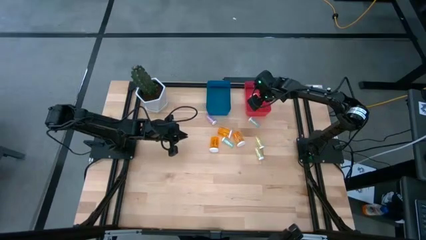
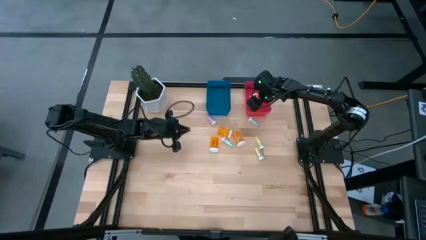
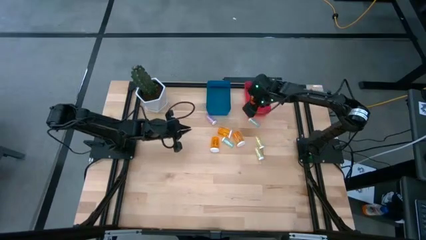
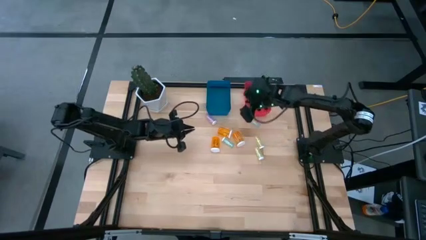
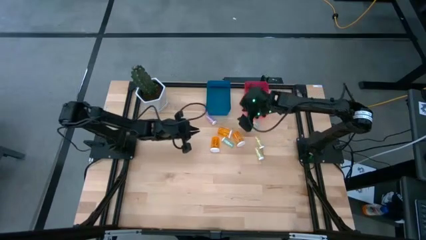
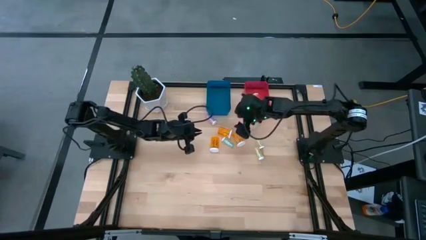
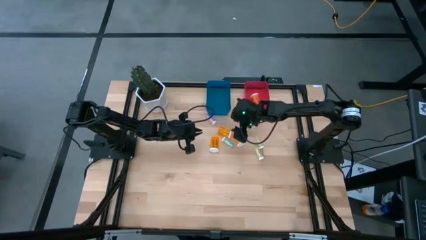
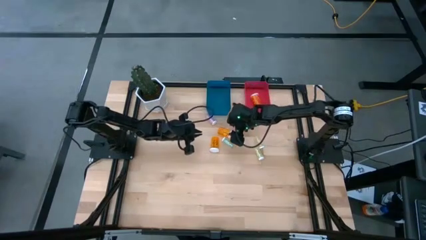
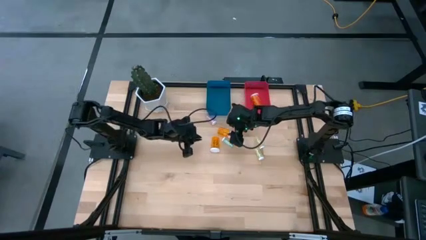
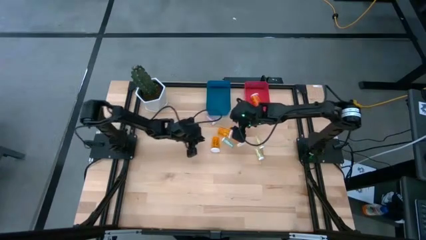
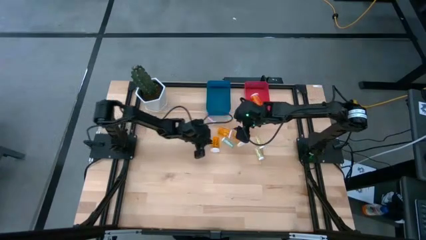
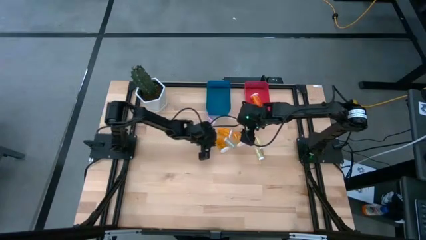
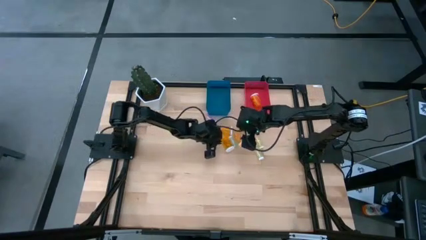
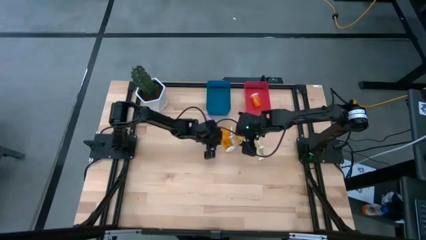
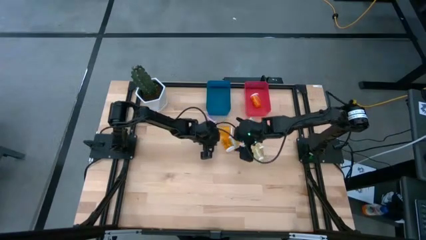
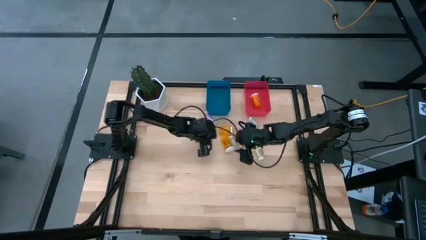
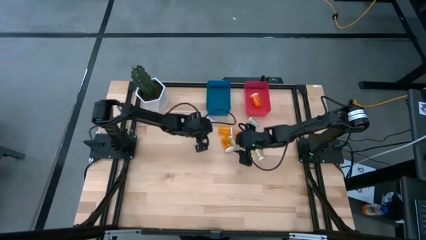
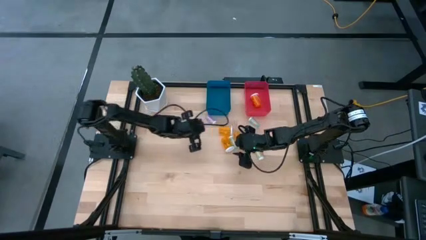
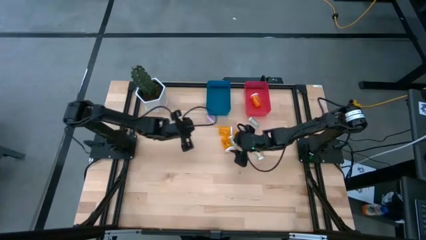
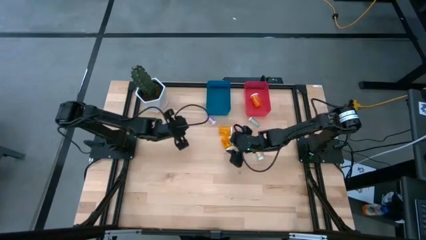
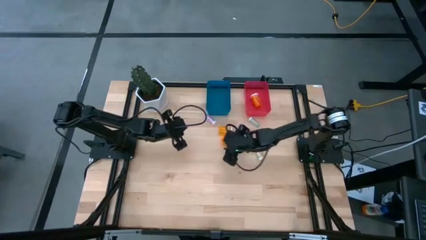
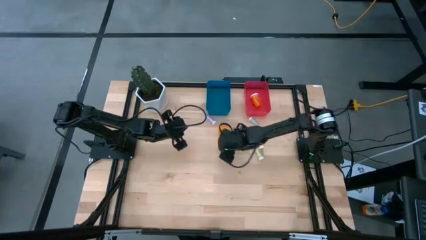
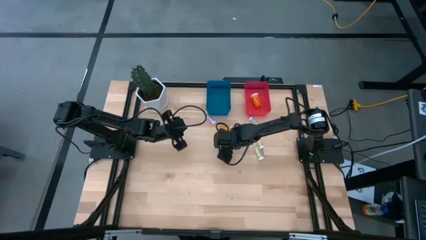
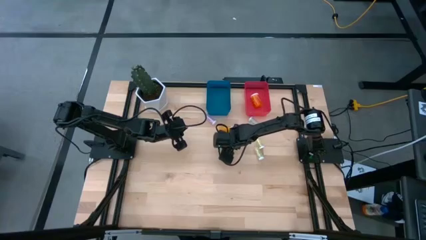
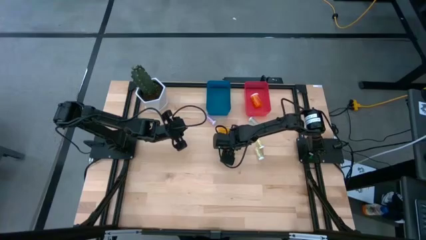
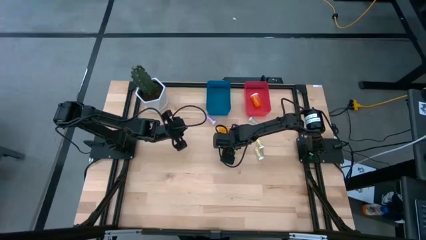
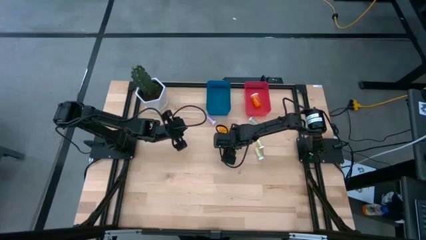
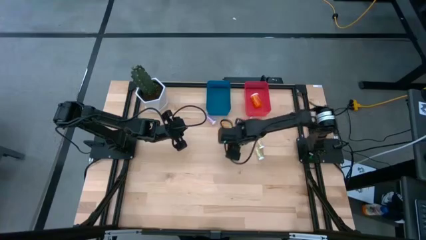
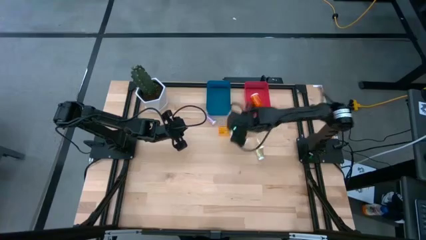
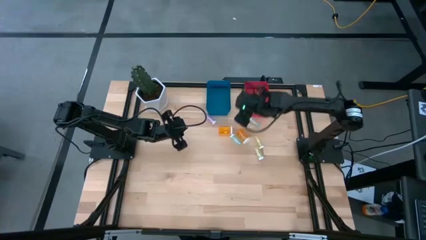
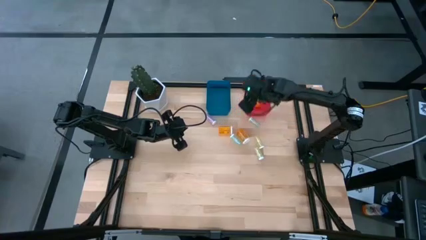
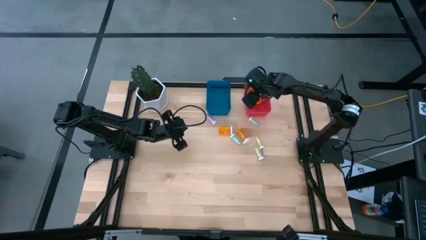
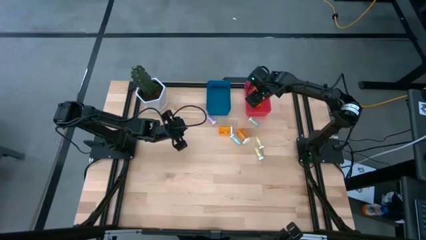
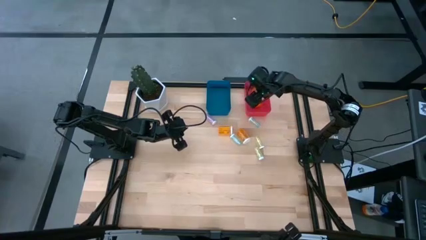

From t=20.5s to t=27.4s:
Task: Pick and place medicine bottles into bin by pill shape (circle, oval)
Put the large orange pill bottle into the red bin

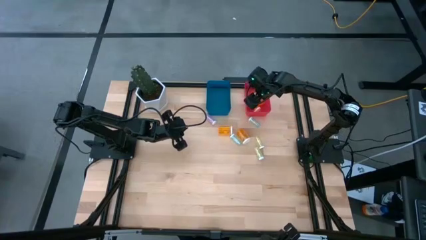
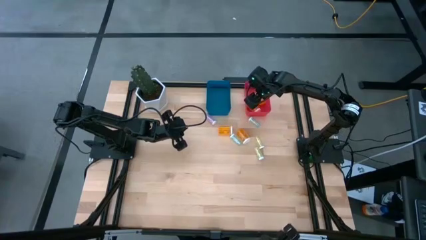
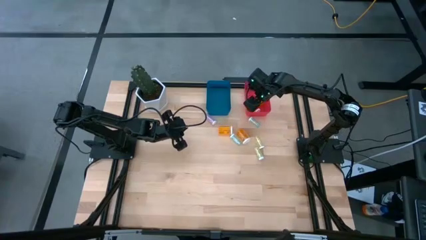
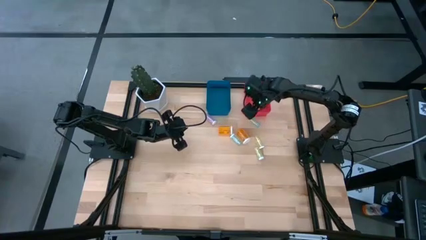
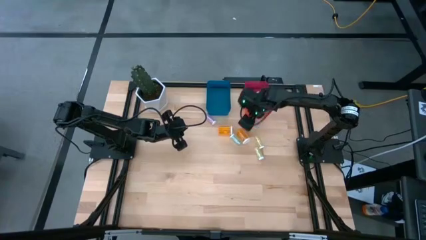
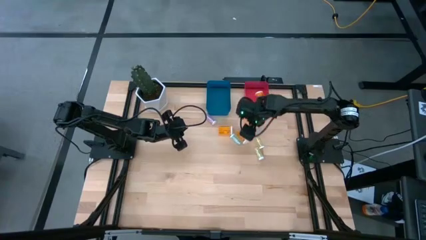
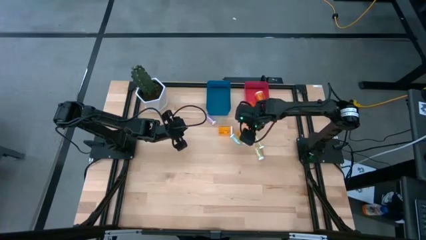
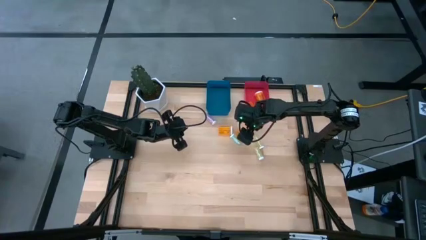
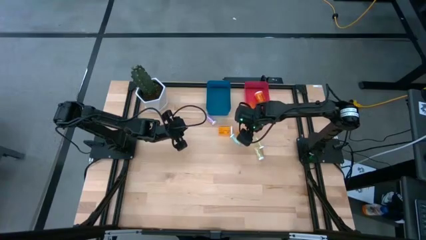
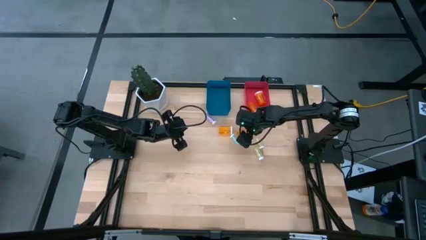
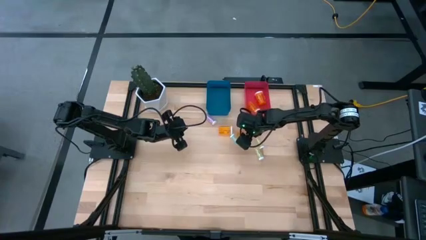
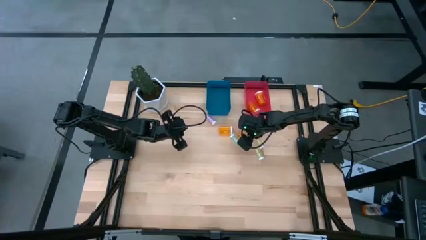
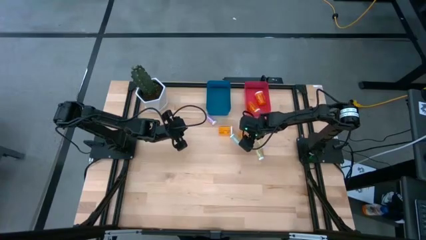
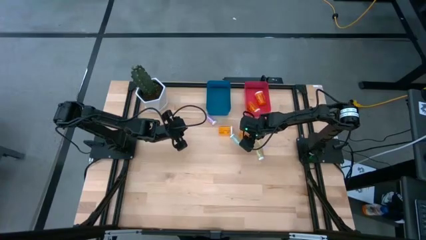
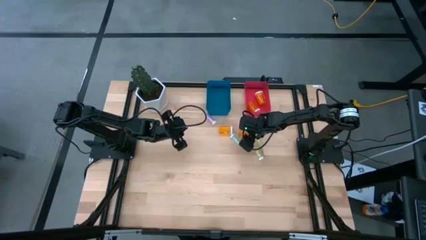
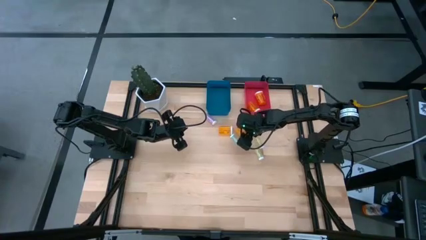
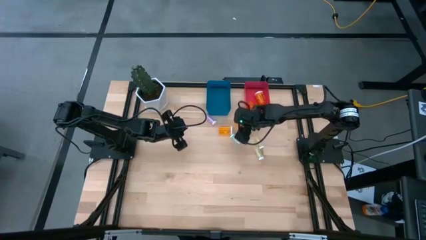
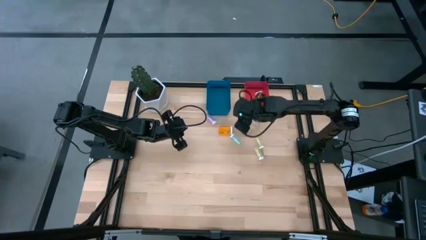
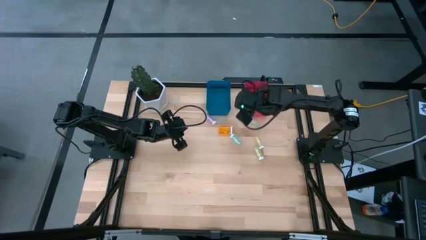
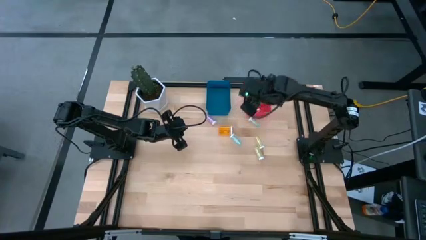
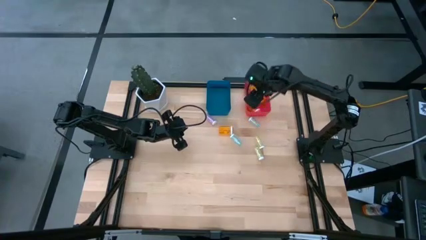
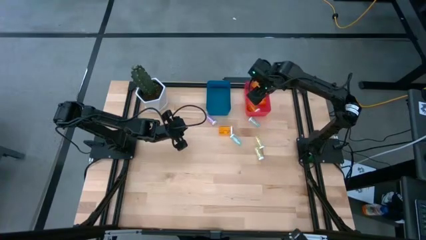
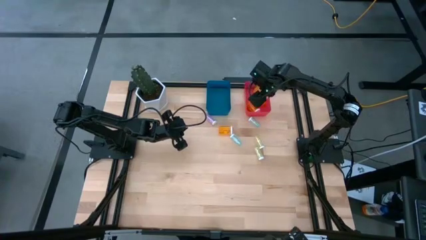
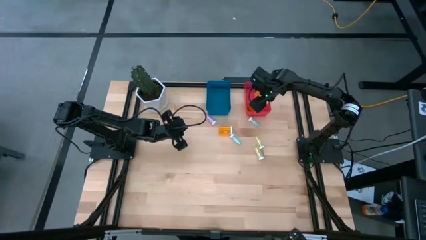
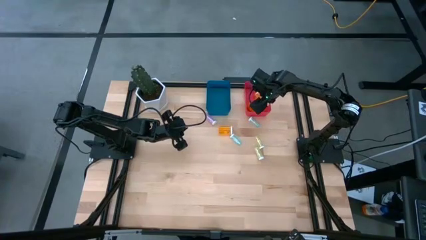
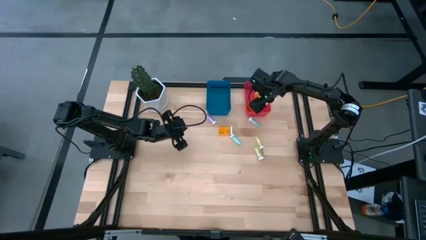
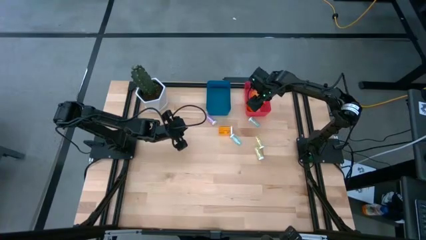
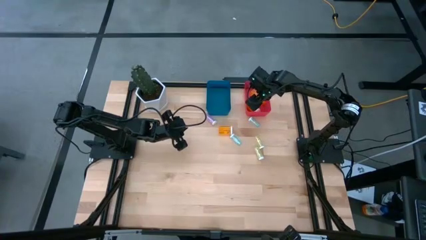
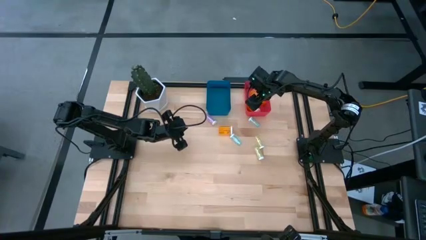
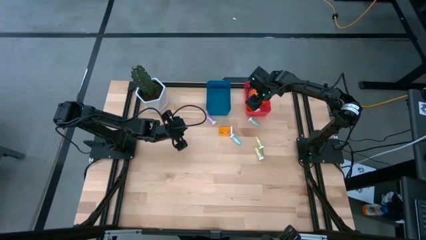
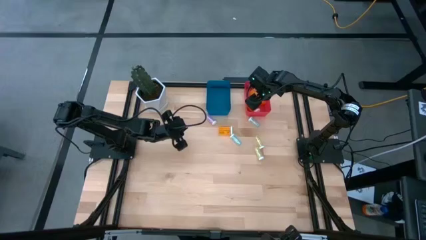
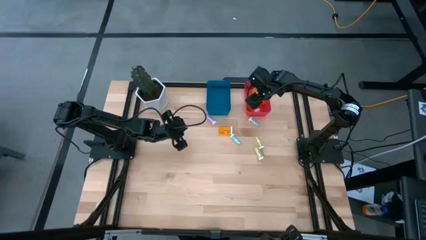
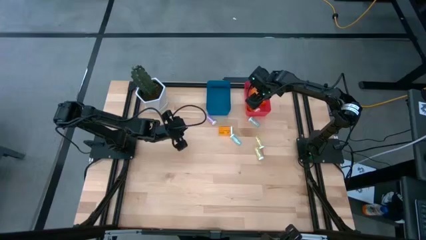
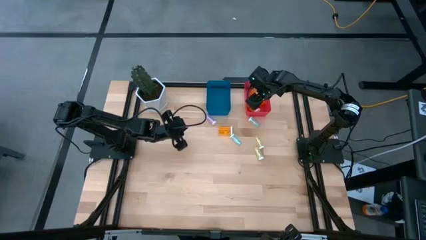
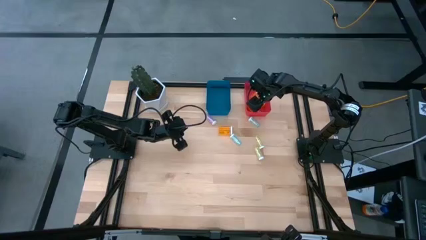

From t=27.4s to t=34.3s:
Put the large orange pill bottle into the red bin

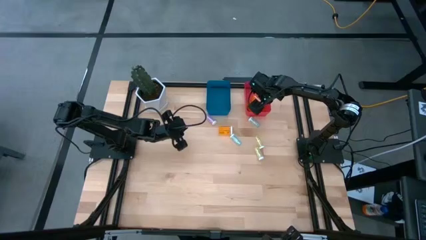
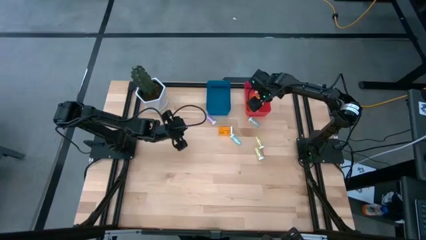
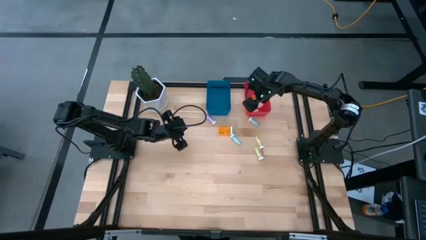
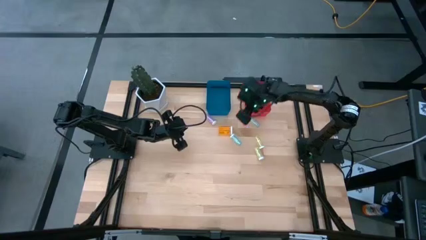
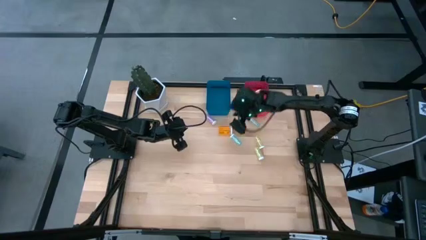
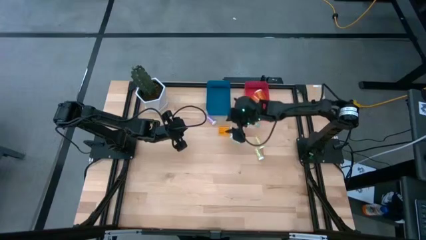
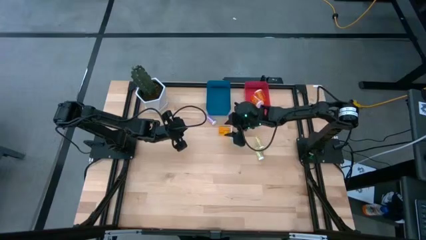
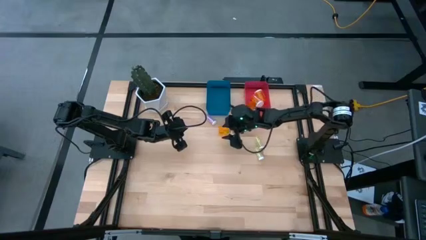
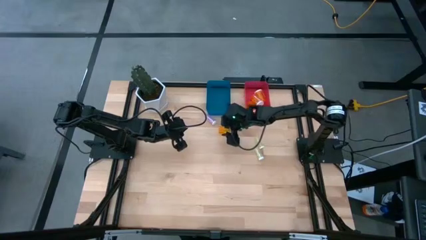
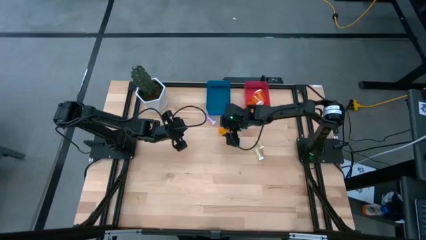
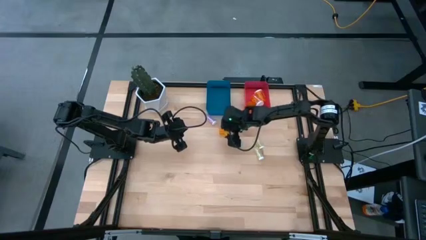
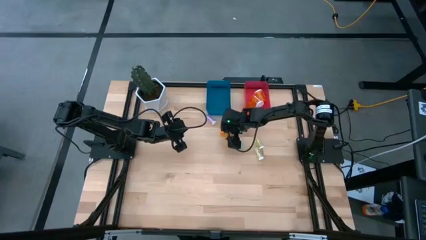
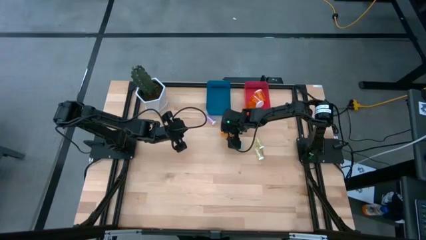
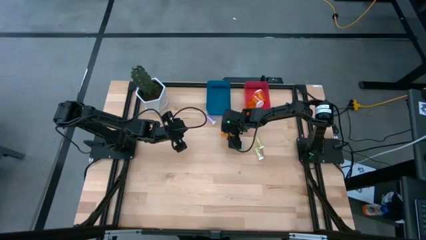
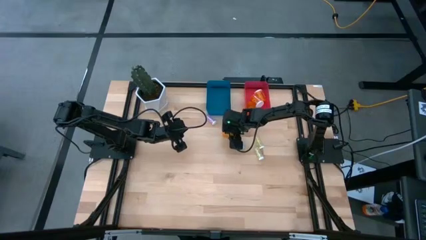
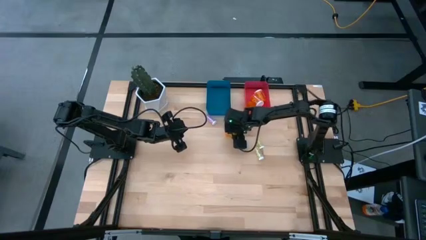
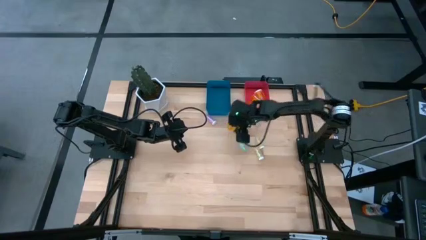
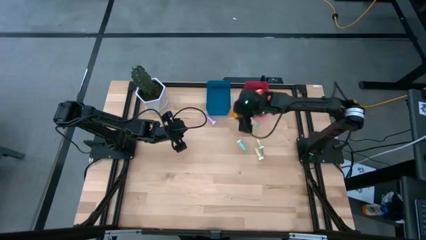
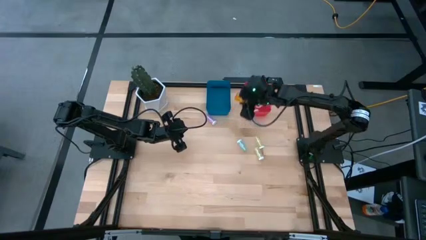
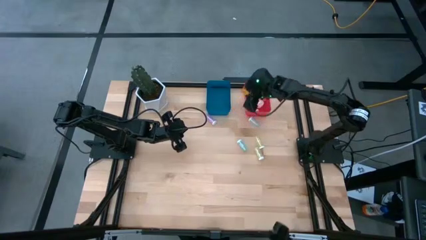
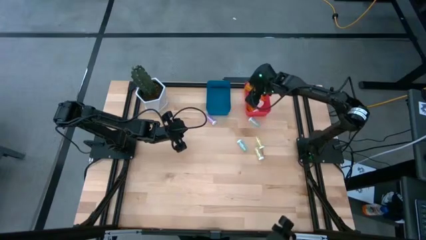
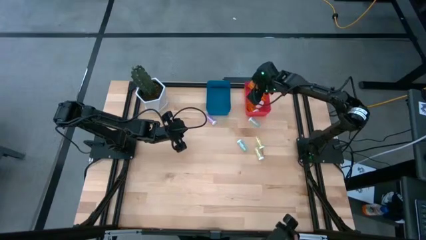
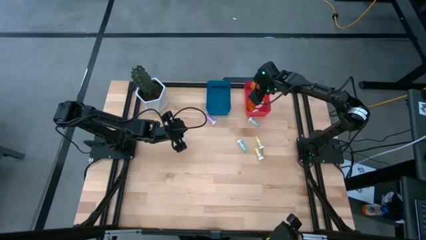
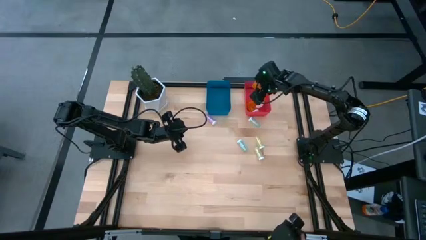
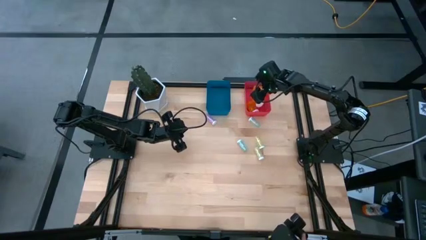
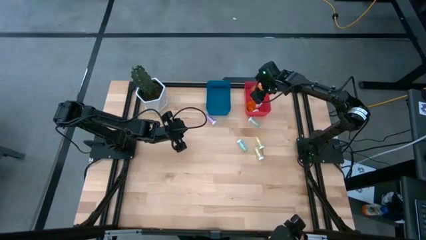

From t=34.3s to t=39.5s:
Put the large orange pill bottle into the red bin
